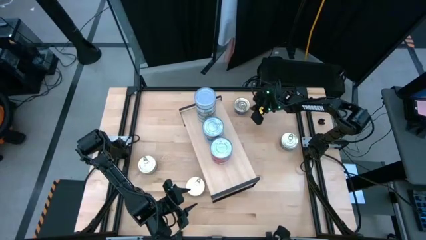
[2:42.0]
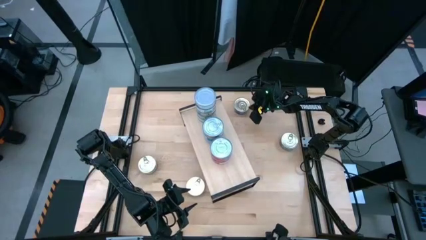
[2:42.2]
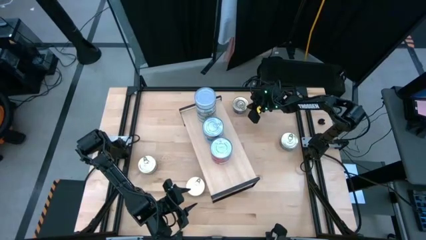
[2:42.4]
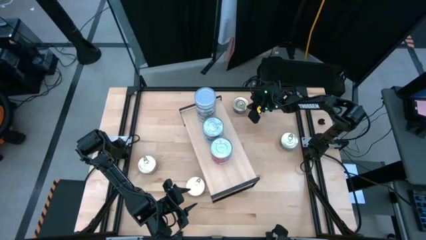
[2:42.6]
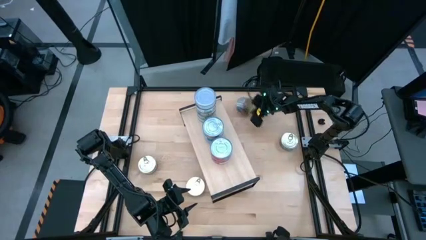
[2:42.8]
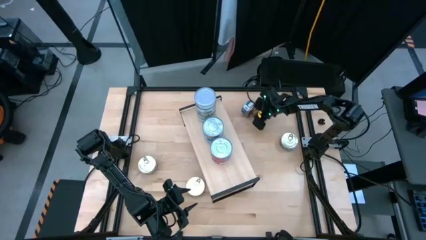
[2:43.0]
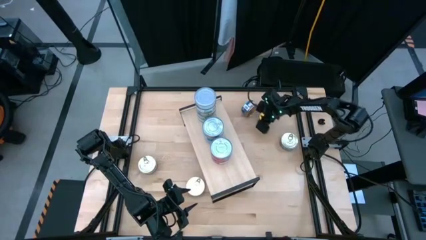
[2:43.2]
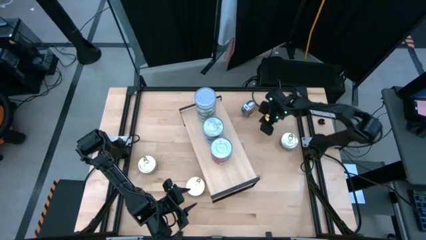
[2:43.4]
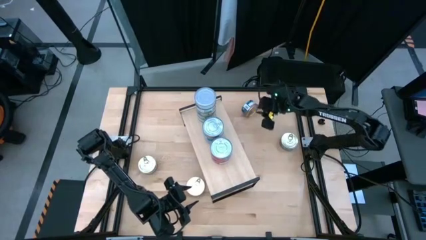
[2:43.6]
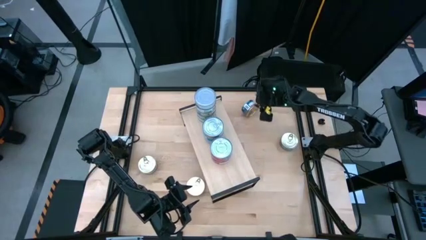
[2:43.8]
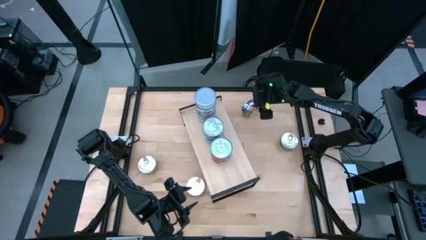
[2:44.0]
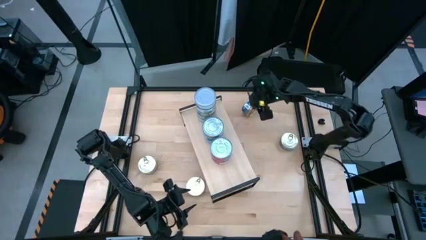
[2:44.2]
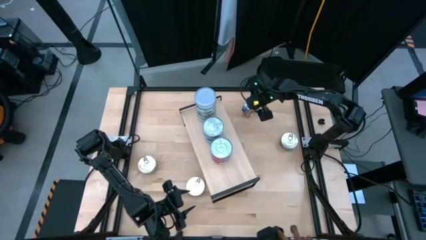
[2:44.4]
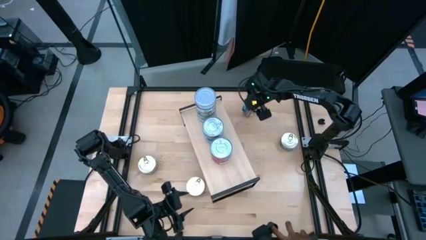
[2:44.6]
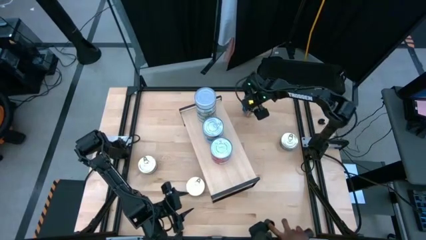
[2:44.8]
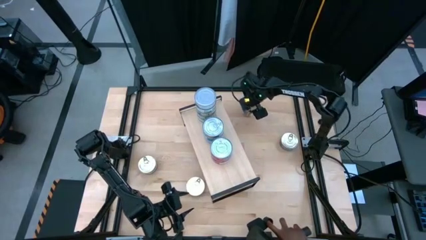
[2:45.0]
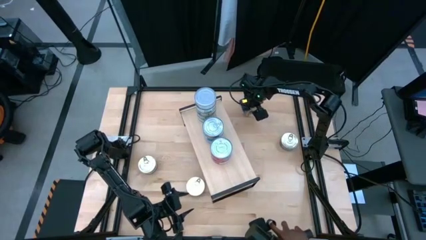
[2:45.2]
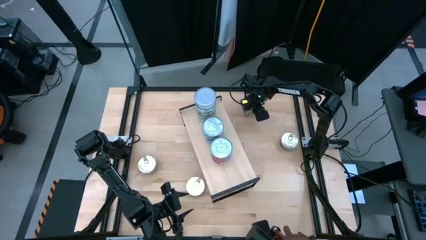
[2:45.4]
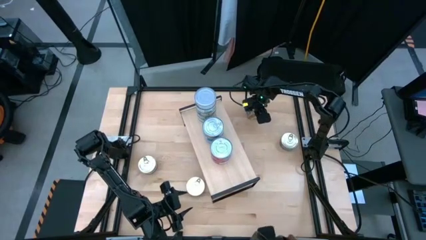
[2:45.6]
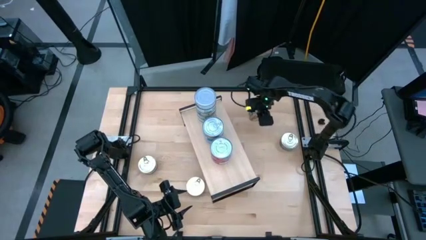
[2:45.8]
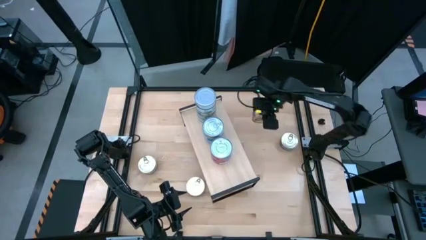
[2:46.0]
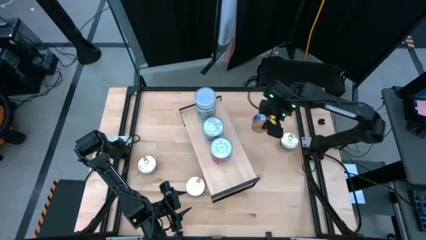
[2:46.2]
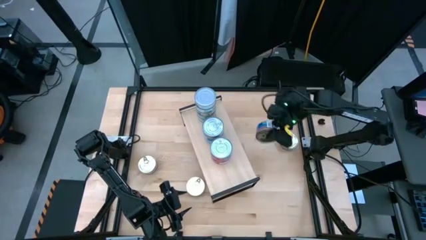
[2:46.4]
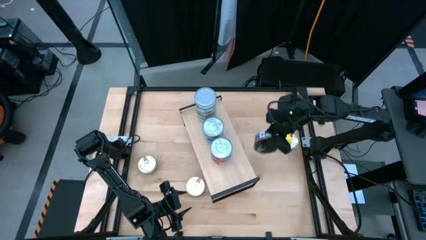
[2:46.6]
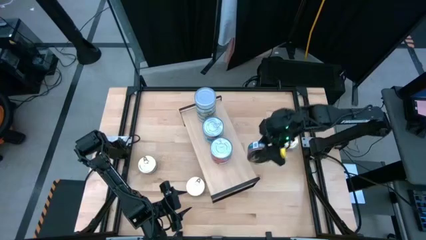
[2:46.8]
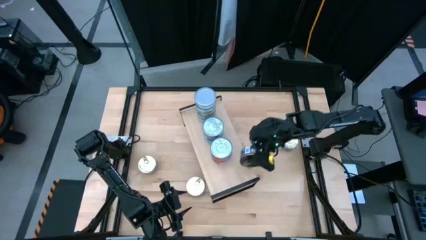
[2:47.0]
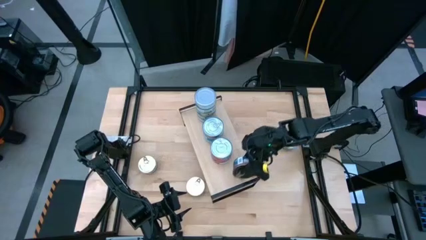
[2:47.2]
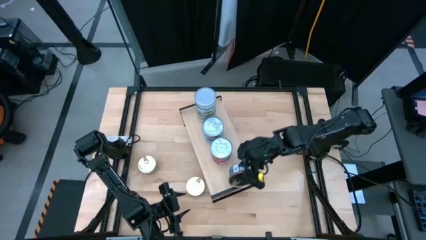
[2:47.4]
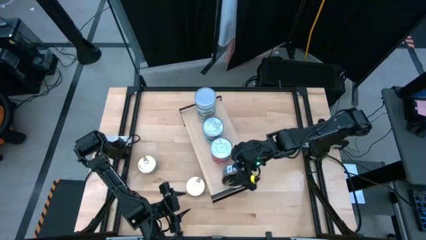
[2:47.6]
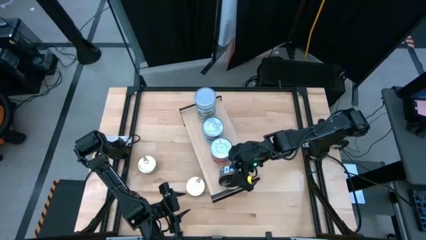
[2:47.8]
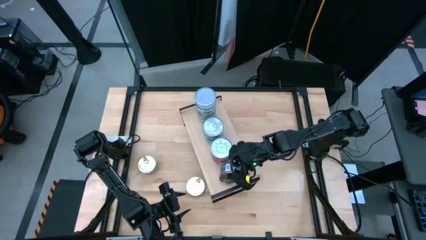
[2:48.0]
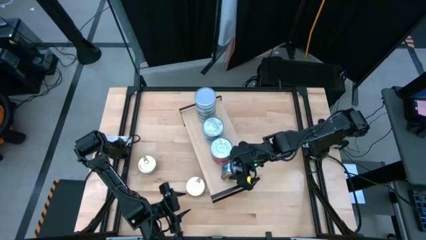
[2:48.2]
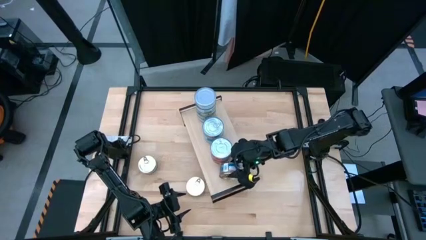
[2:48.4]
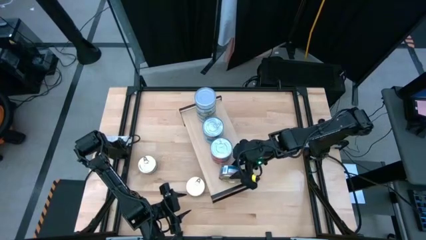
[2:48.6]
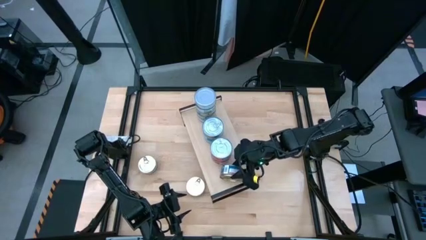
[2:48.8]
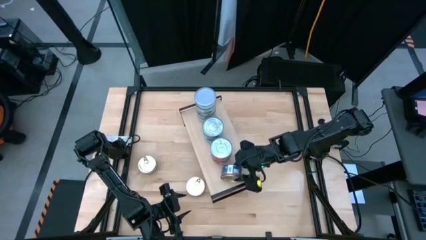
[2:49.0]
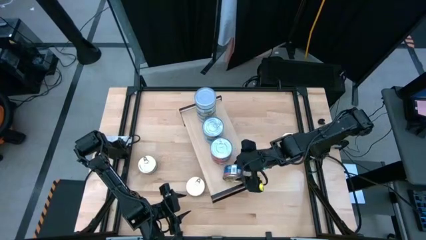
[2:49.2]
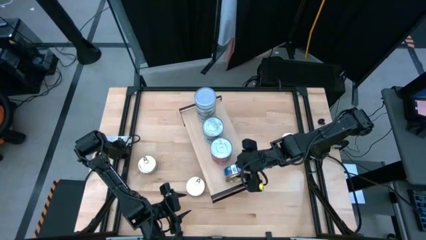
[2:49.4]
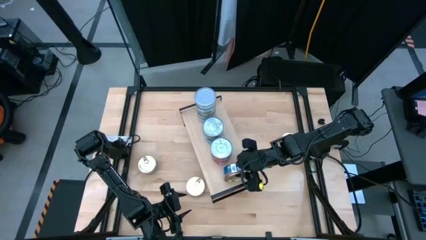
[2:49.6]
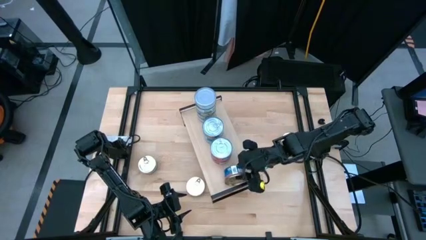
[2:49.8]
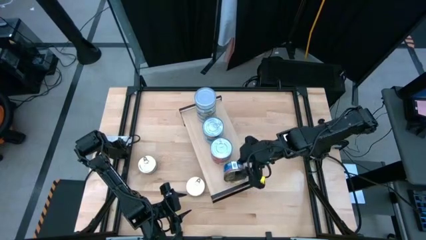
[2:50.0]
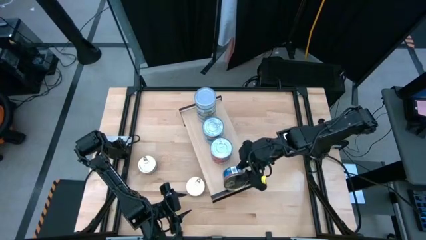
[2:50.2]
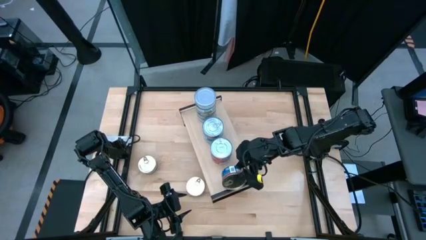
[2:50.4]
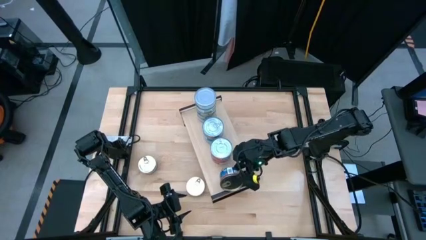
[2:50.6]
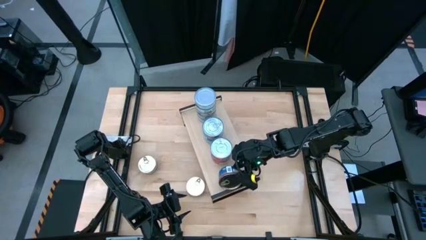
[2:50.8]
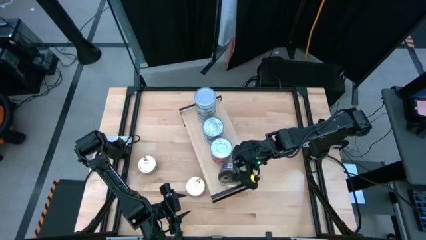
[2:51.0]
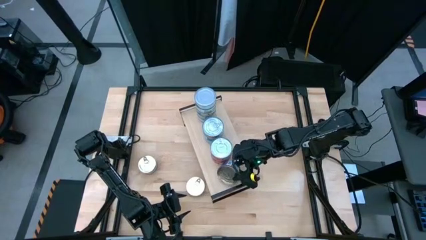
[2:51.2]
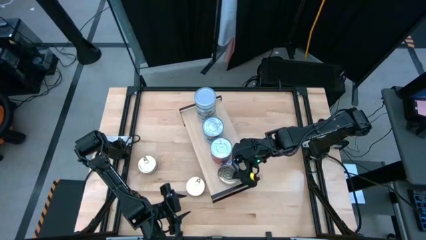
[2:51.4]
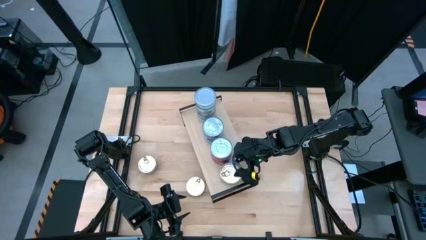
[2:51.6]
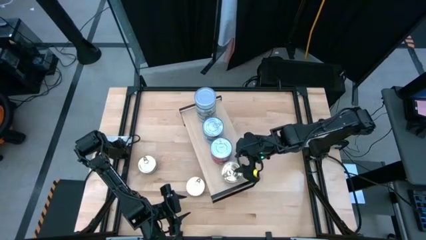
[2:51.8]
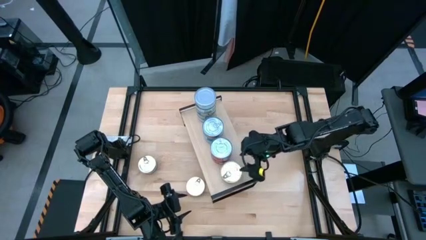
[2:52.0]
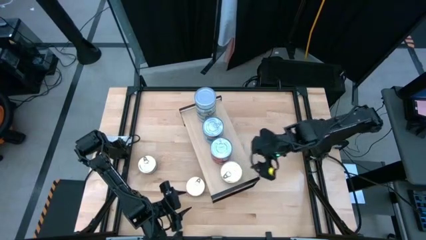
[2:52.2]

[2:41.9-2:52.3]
Task: Stack canned seafood by type on shelf
Put the top blue and pink tuna can on the shelf
